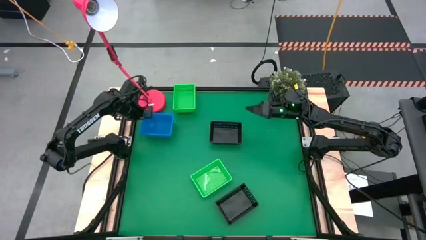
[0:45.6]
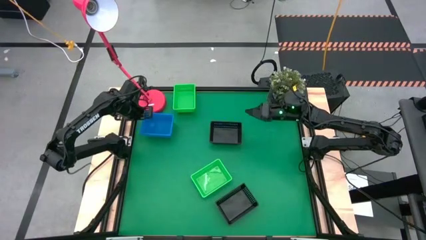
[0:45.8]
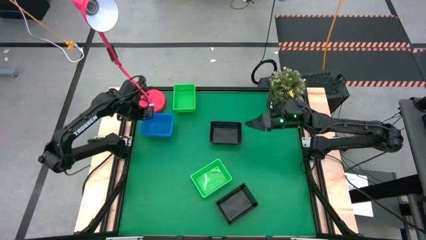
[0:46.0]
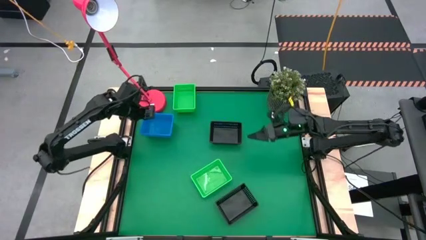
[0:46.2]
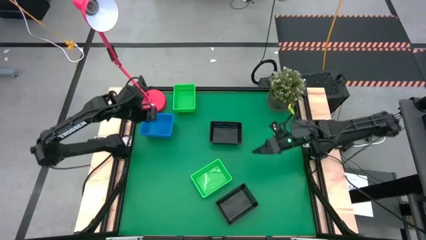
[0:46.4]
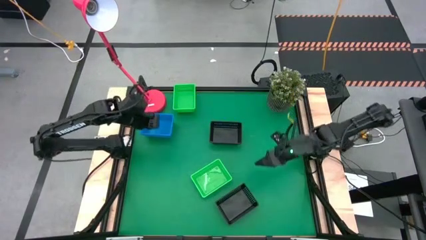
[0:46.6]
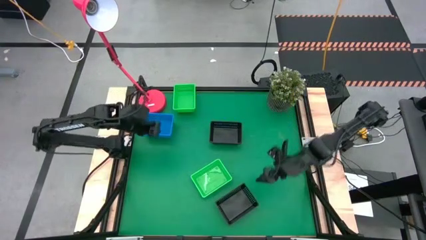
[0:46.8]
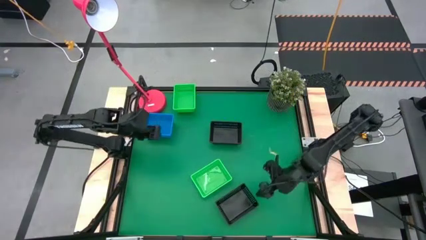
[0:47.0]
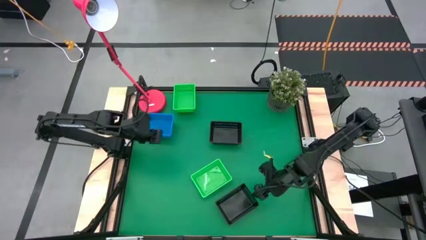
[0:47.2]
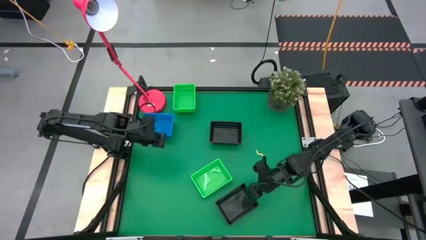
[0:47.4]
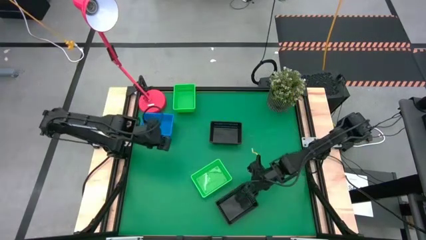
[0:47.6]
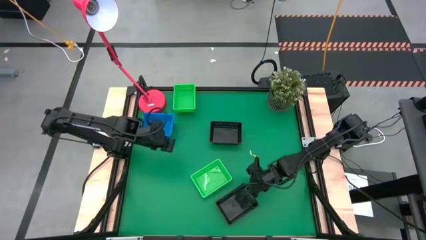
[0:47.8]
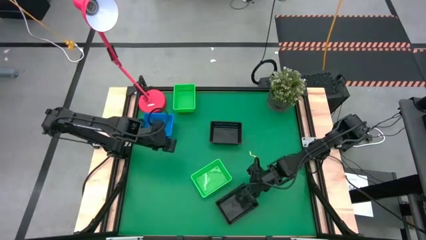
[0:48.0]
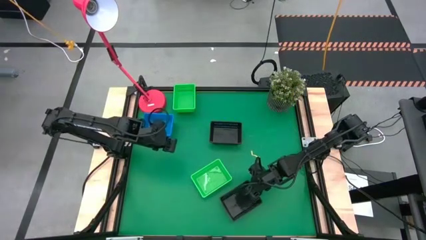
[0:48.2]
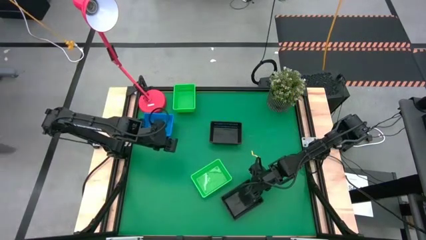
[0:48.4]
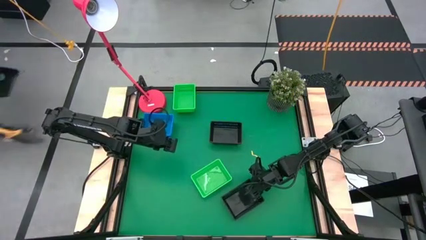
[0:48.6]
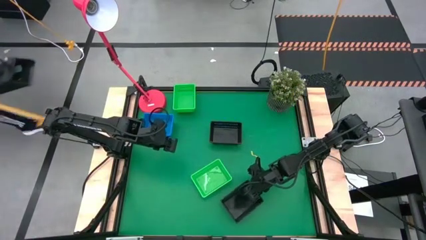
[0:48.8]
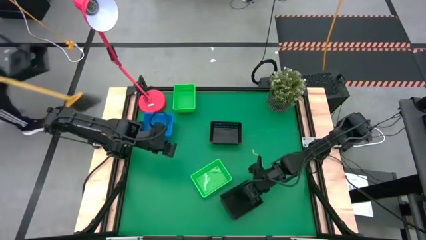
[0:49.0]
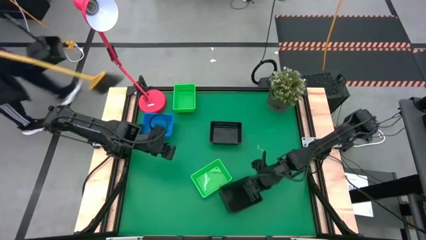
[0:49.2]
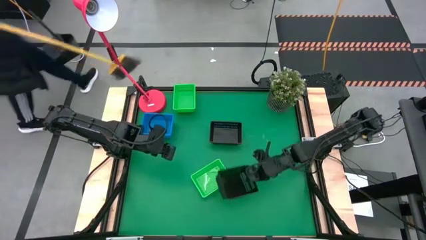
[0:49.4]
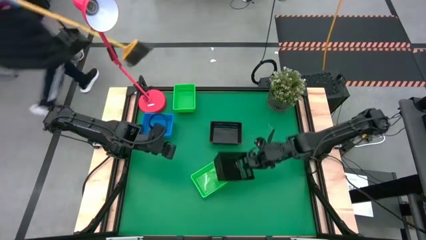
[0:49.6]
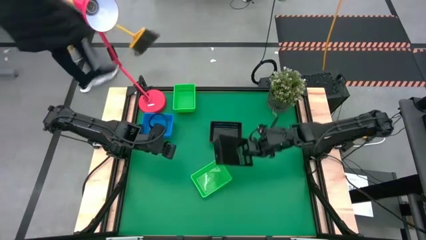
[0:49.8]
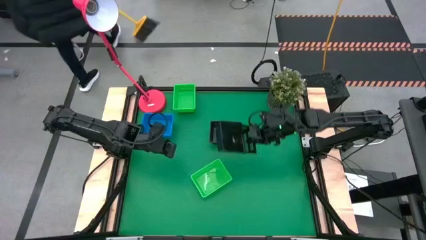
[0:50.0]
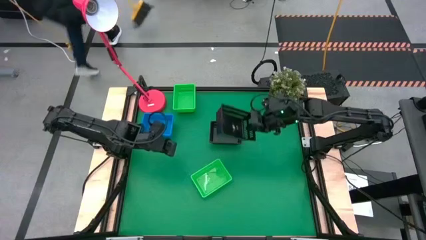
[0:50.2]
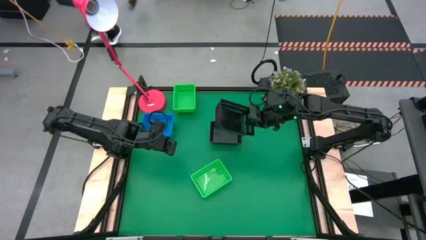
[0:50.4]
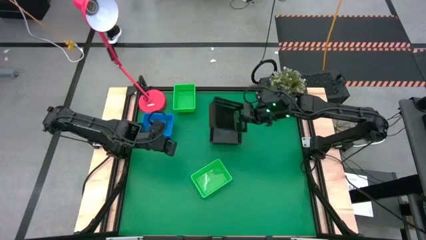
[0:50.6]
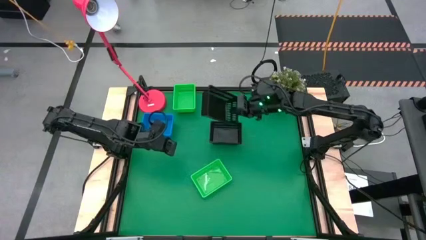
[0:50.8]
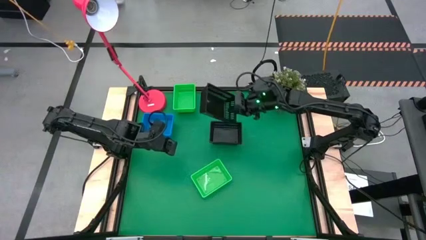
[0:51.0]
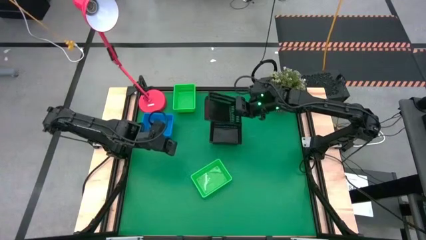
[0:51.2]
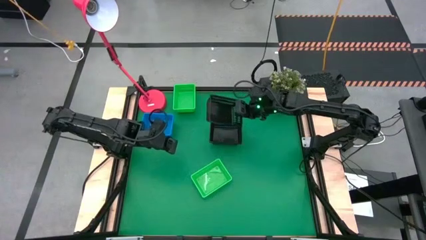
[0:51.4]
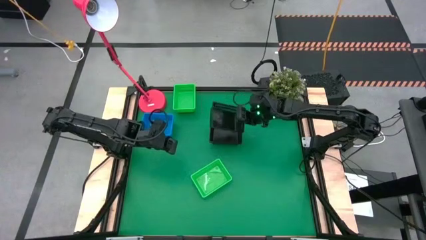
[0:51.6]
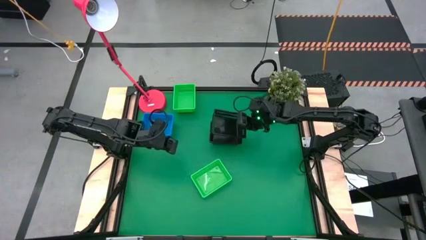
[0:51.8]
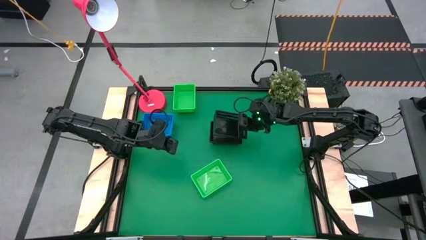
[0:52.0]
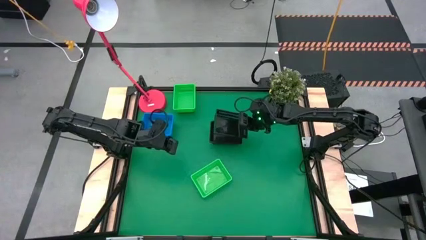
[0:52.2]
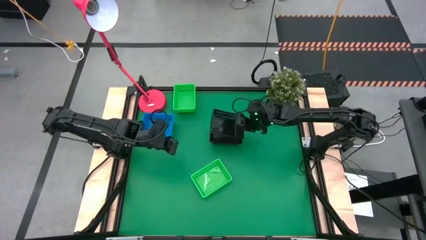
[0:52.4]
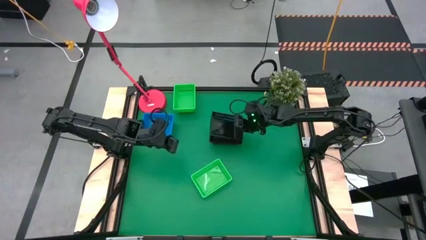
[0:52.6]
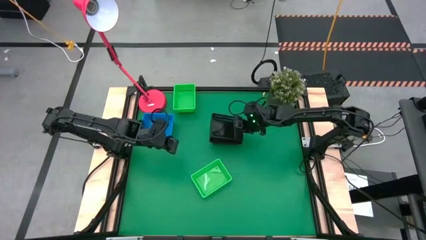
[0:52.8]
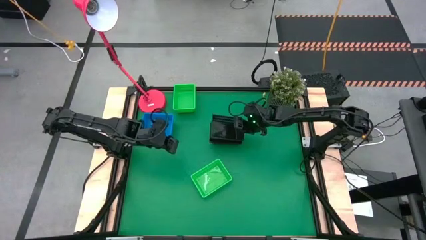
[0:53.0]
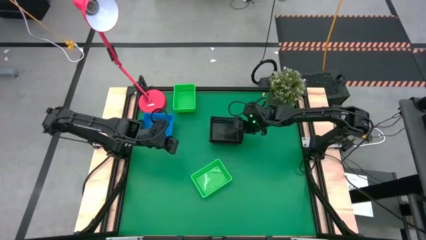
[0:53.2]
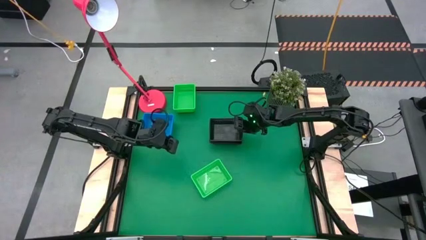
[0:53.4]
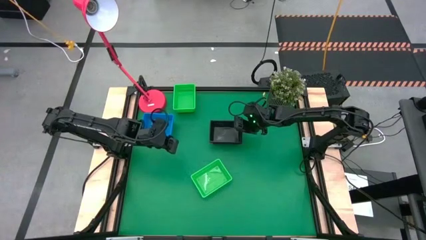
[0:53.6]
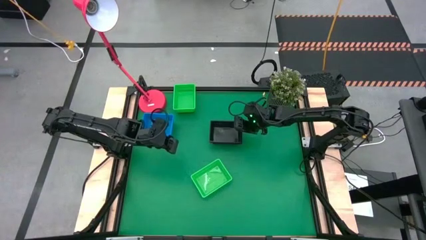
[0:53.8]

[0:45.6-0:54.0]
Stack the bottom black bin on the top stacked black bins

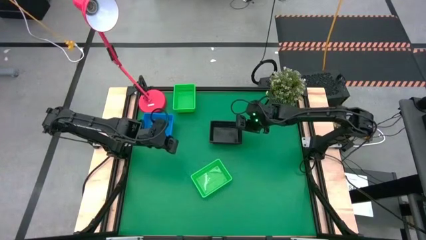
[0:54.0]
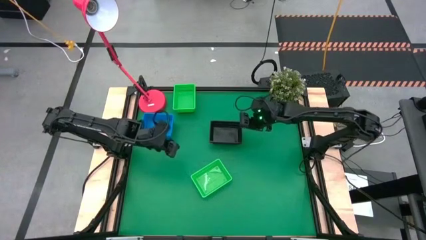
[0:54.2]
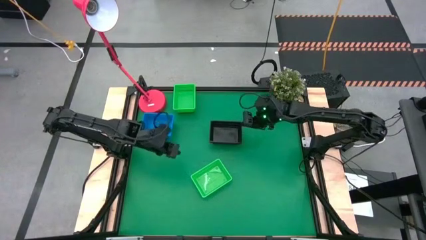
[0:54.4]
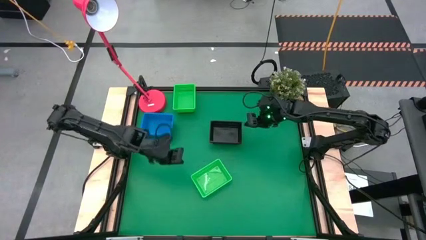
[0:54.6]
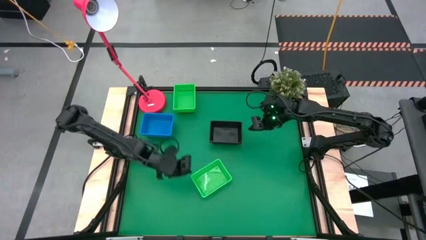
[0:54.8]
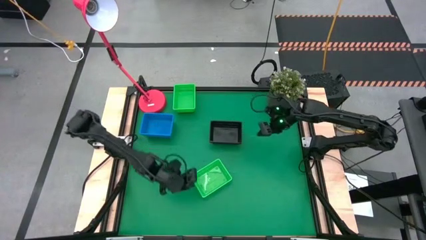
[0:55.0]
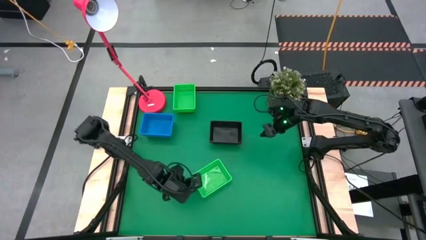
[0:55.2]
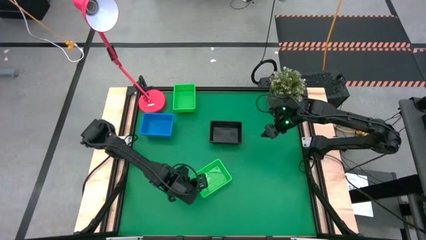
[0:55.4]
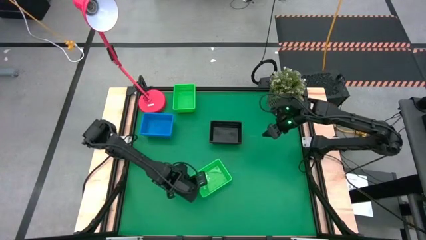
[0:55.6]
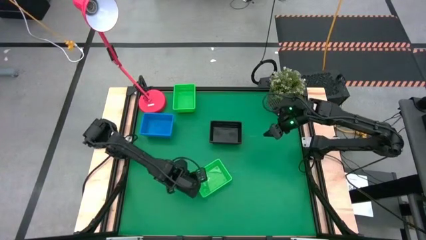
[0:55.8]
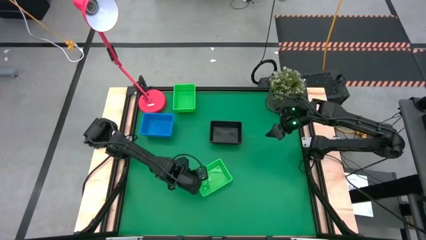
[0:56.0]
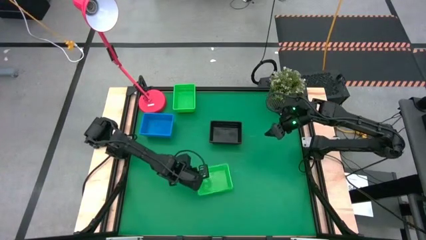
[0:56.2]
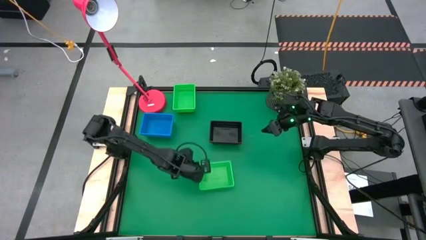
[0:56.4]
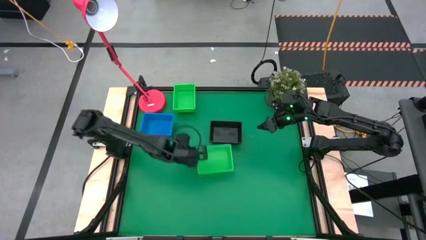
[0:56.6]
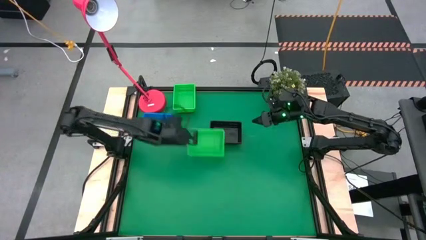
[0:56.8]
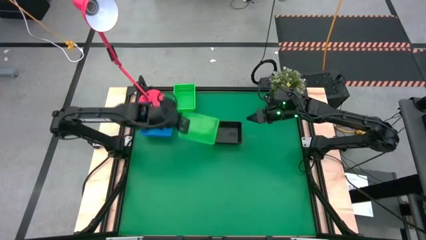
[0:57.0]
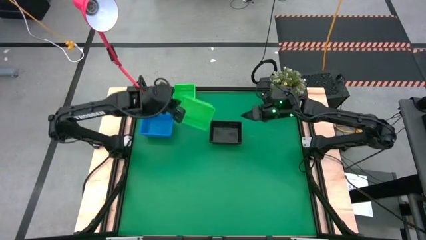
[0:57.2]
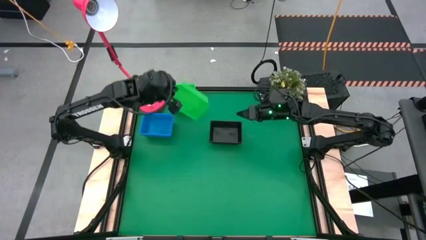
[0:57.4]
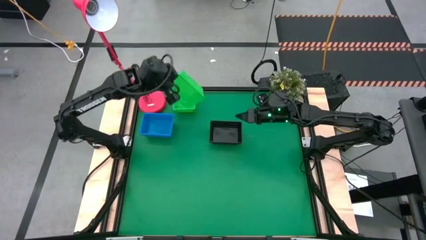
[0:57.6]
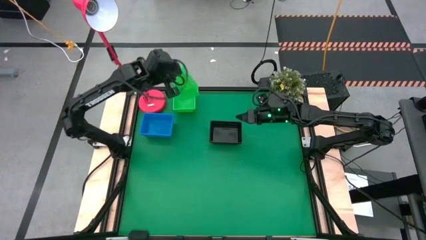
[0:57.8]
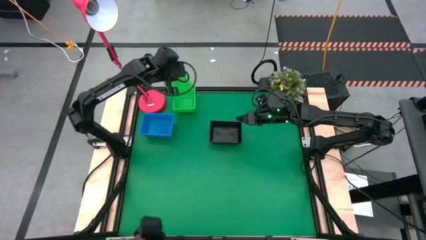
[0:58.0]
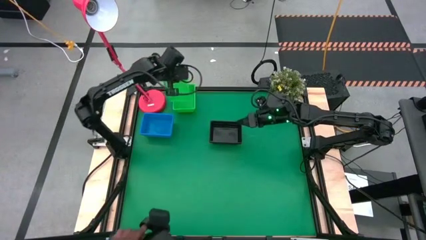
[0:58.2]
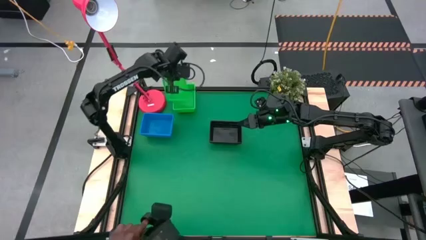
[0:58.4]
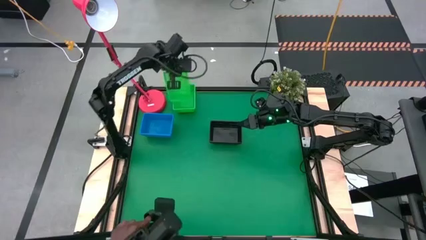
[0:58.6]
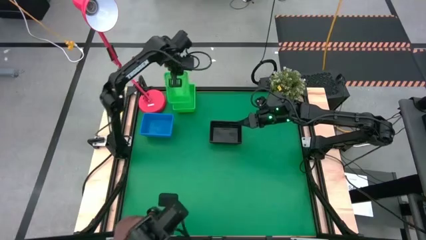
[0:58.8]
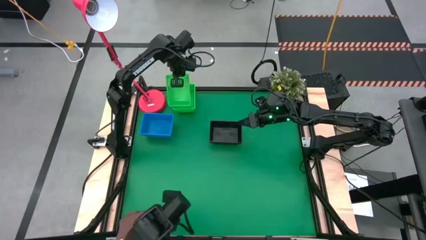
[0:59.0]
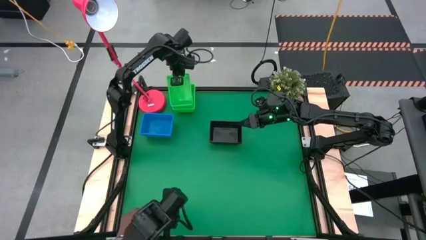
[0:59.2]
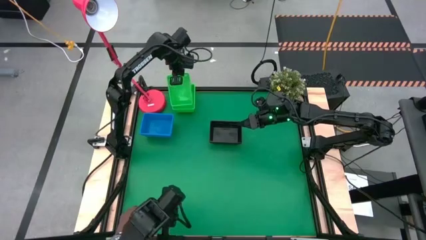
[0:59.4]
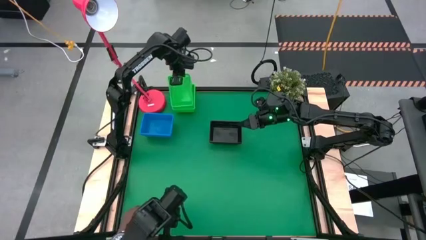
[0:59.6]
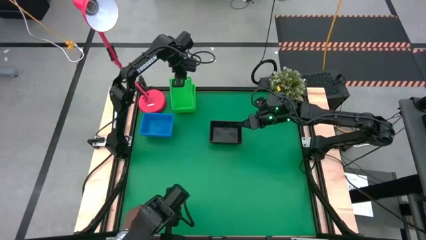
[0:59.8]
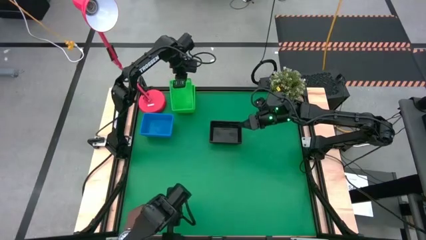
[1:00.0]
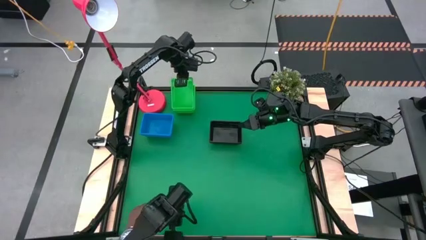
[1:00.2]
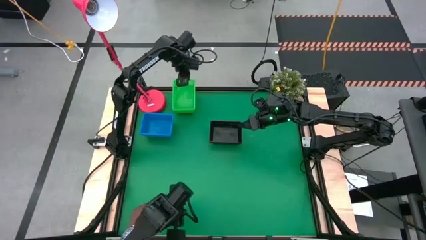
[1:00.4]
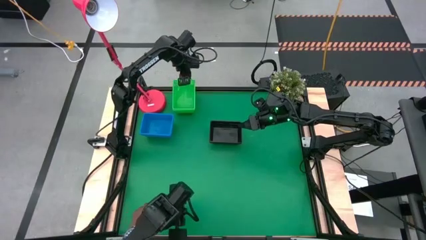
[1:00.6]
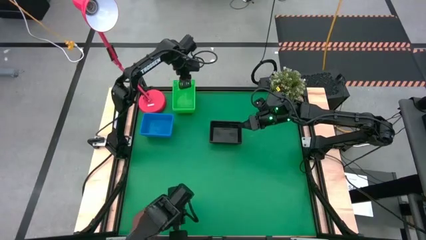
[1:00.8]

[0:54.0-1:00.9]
Stack the bottom green bin on the top stacked green bins
